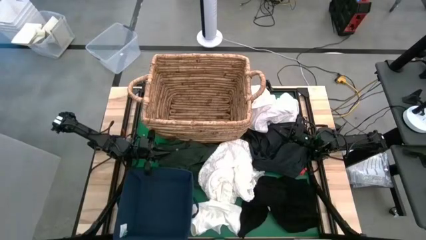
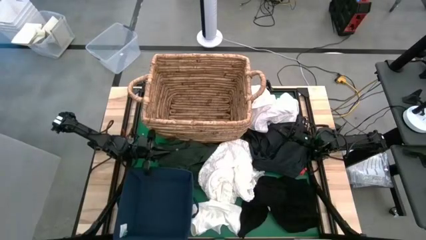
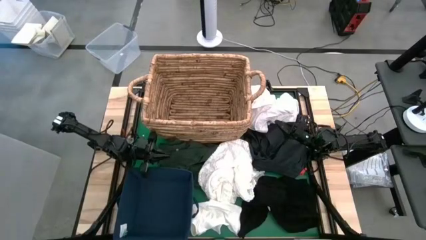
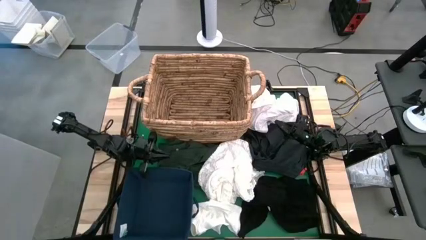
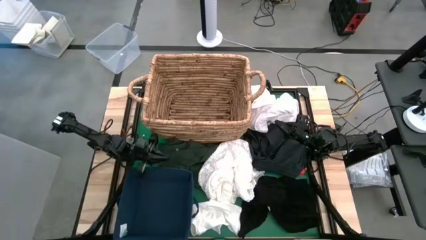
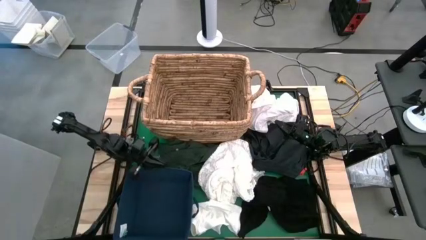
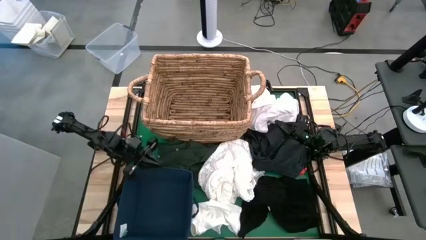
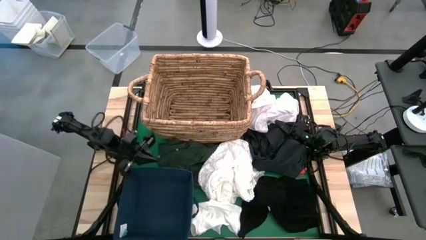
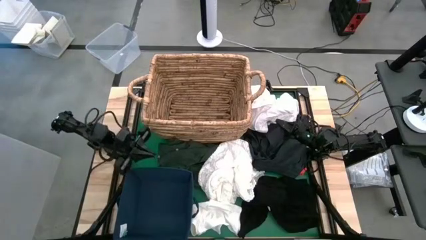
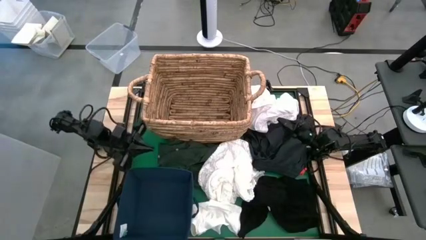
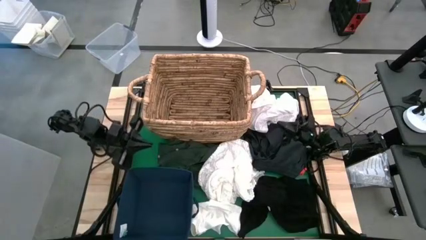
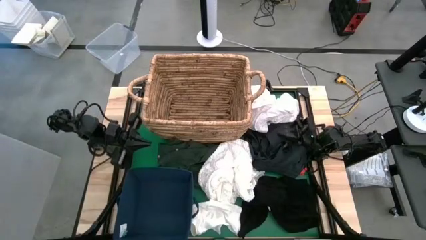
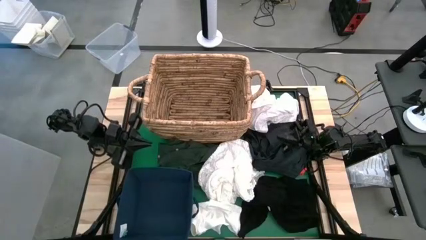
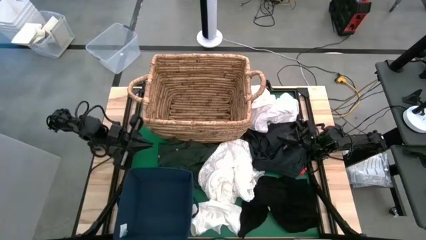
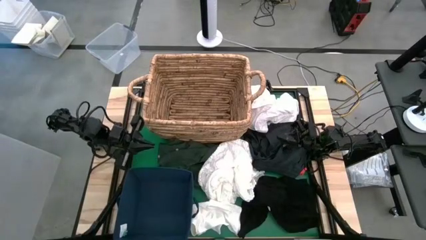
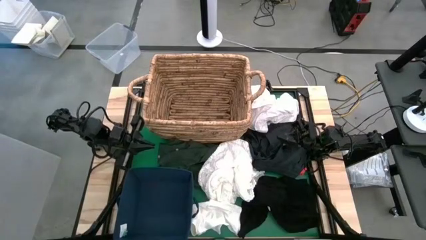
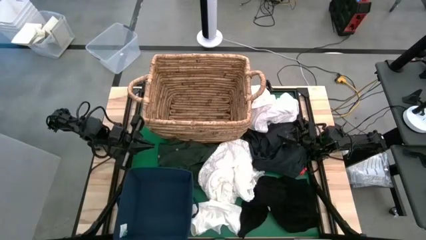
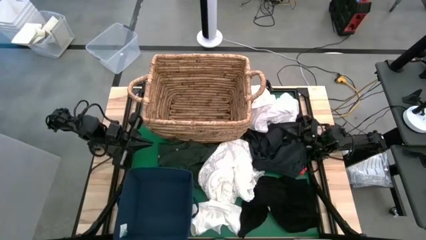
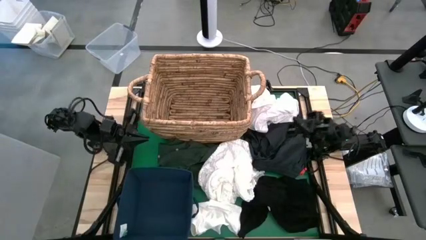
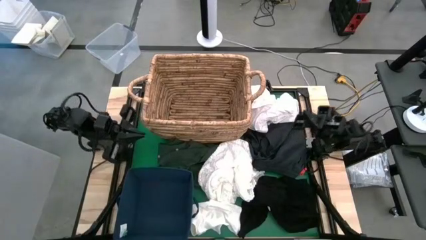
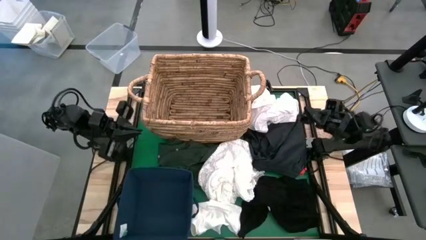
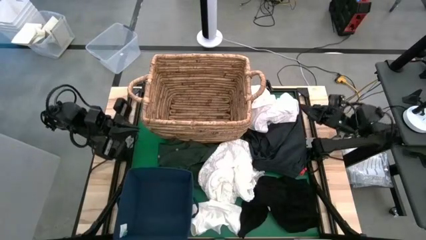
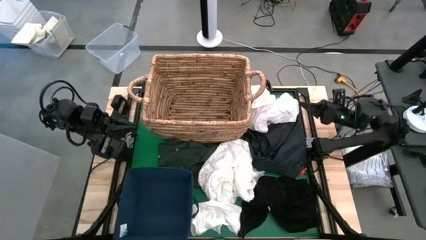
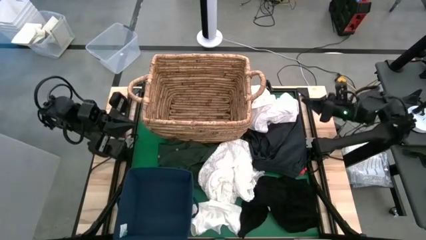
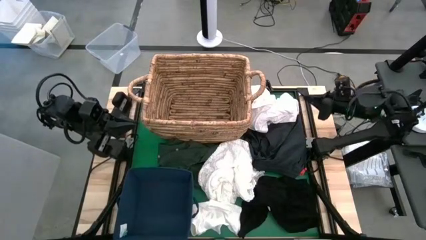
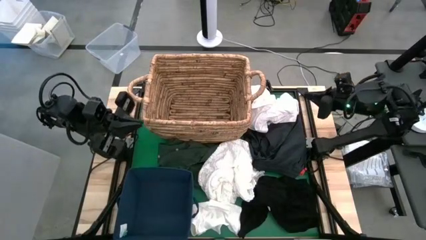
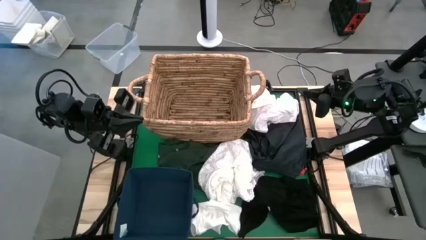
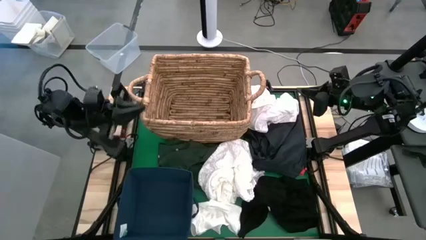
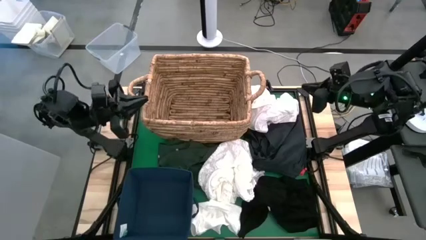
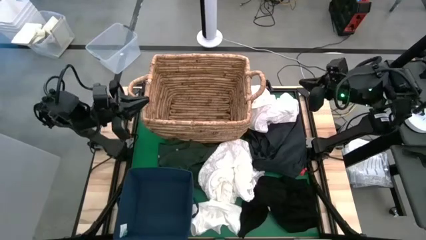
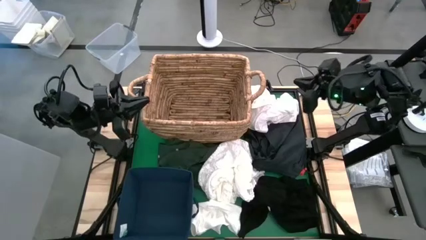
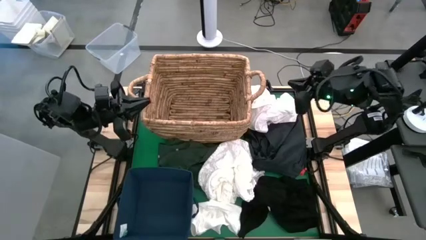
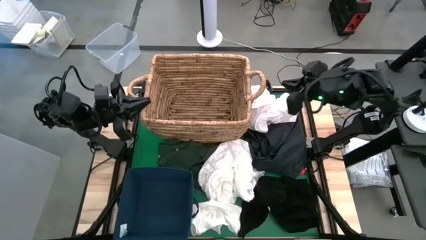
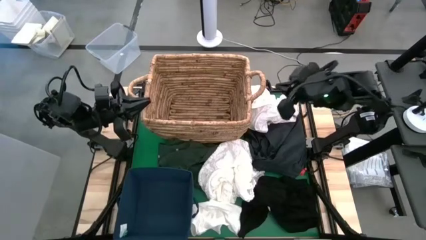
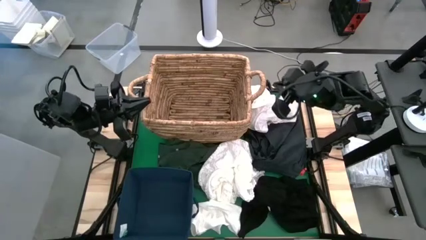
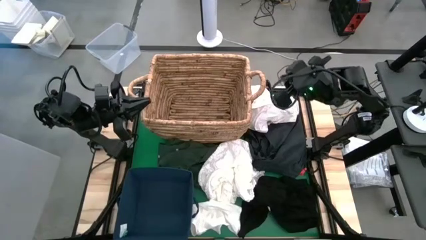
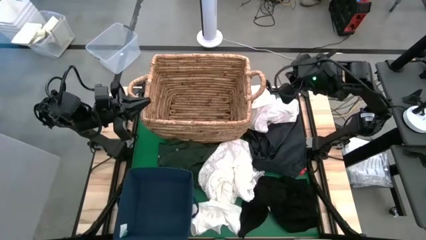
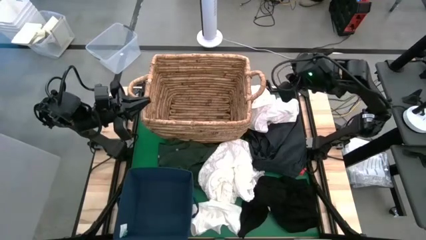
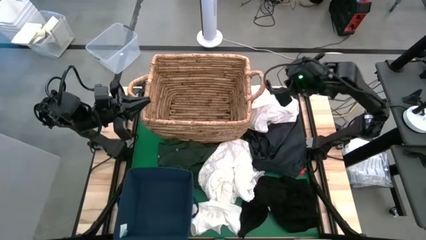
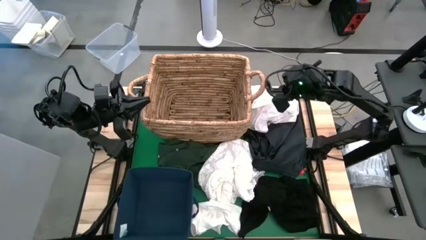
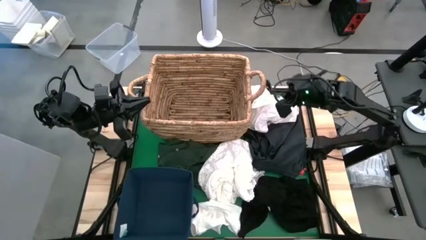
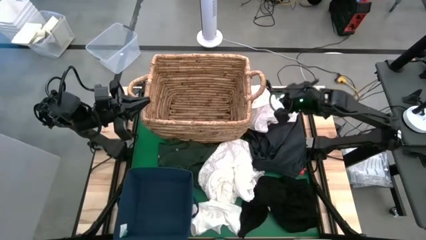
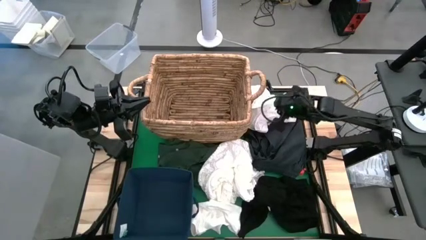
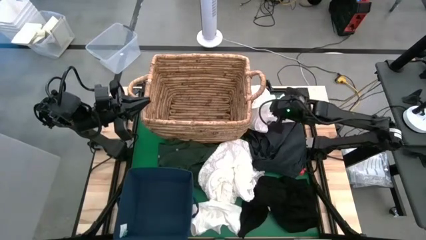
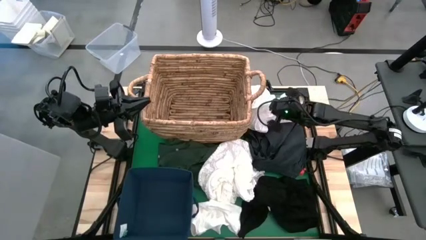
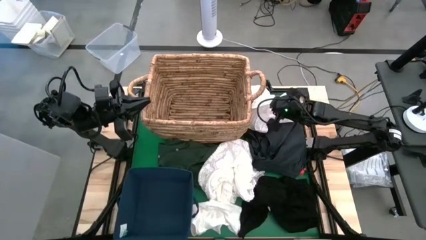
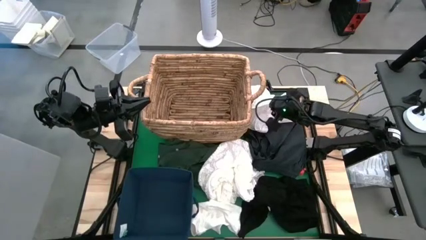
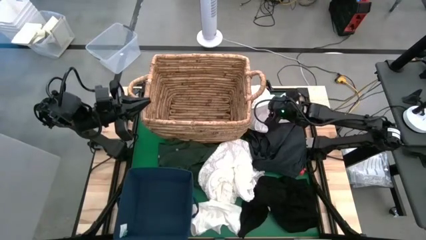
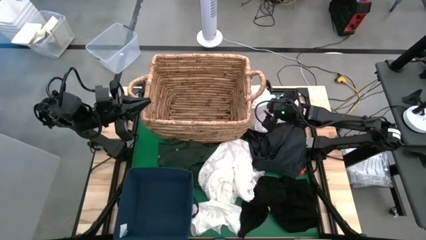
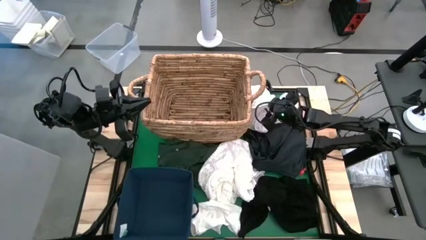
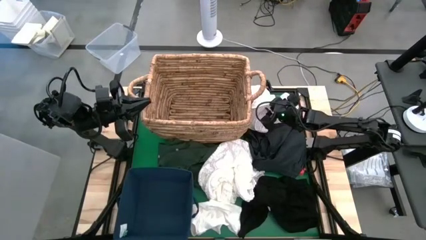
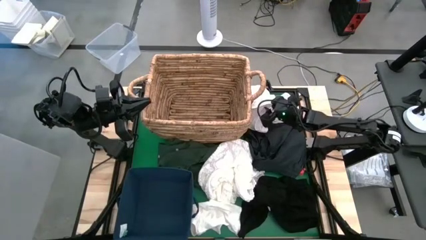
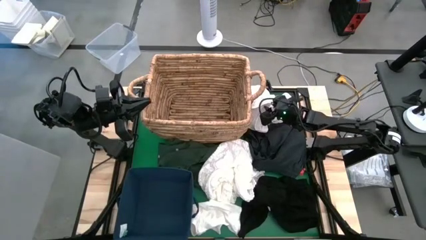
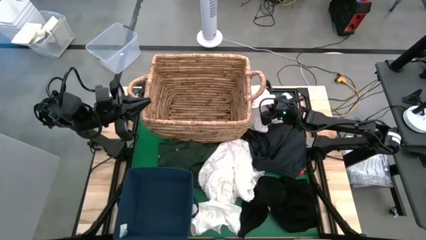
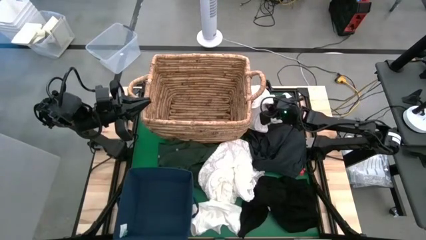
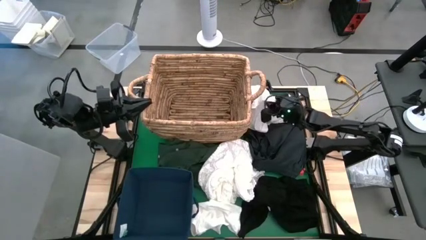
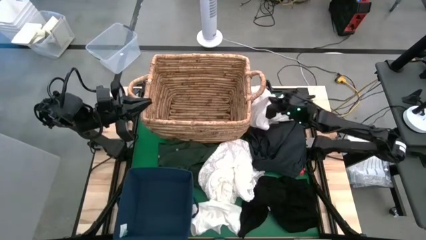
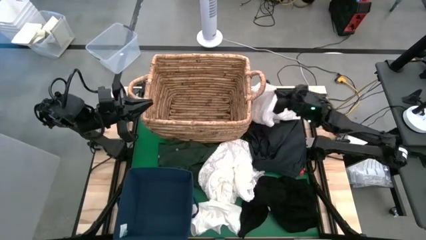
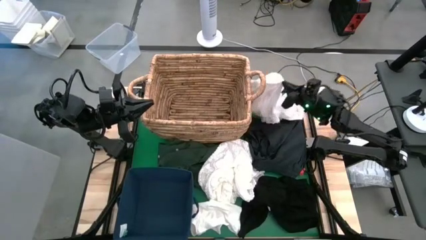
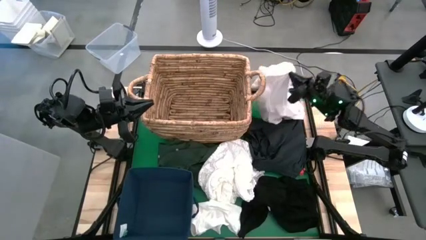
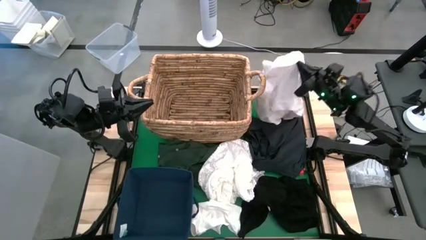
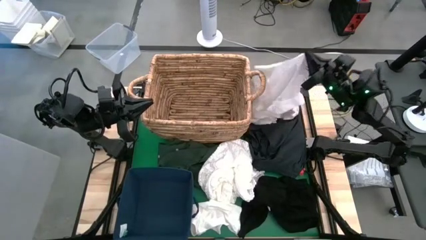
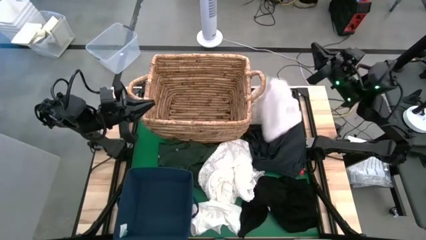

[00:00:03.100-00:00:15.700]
Put the top right white shirt into the laundry basket
